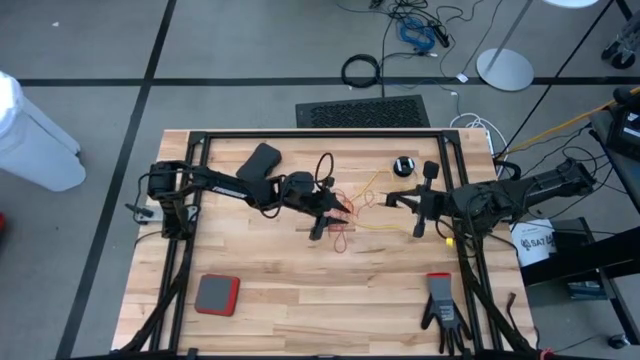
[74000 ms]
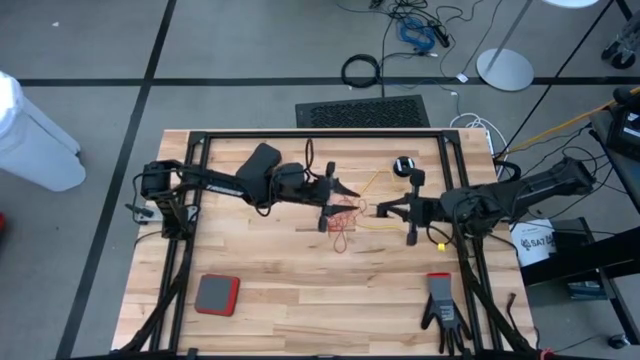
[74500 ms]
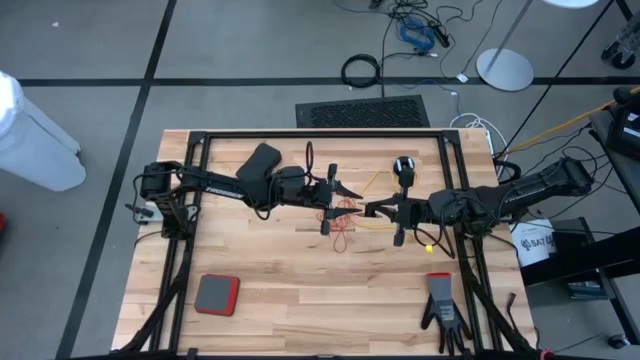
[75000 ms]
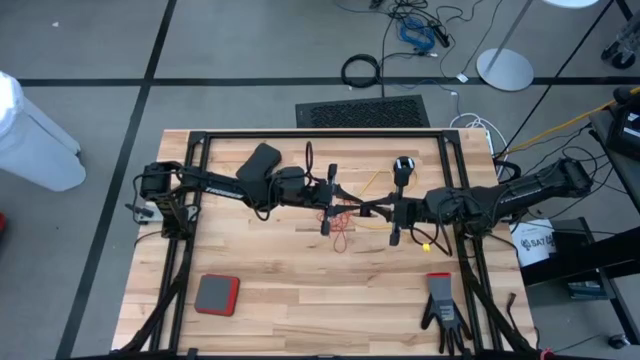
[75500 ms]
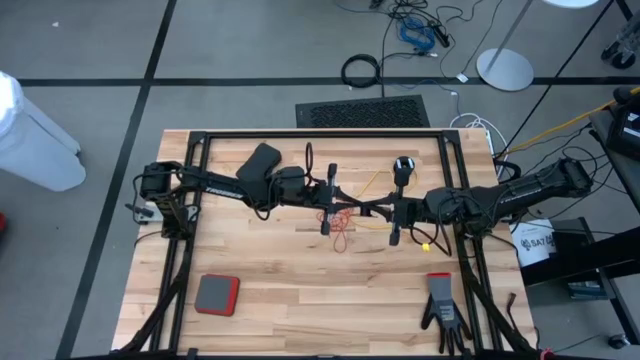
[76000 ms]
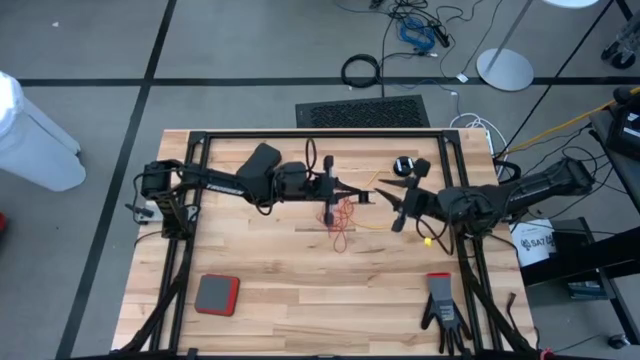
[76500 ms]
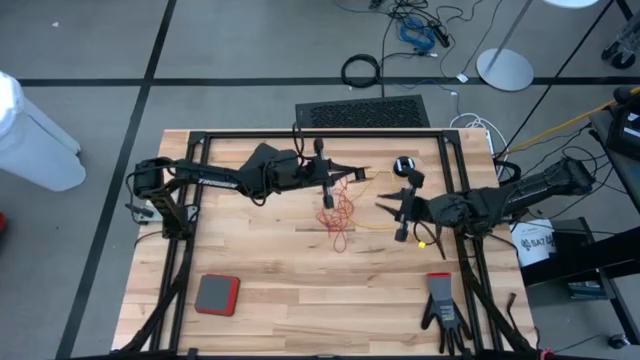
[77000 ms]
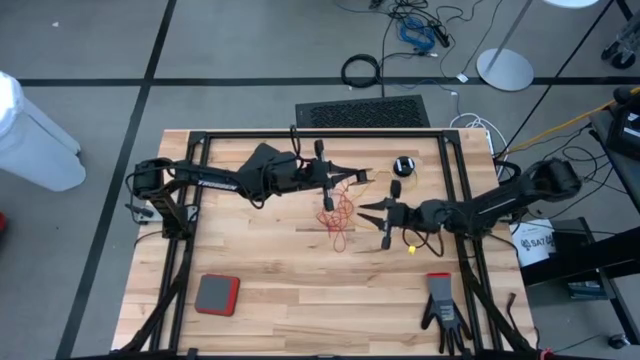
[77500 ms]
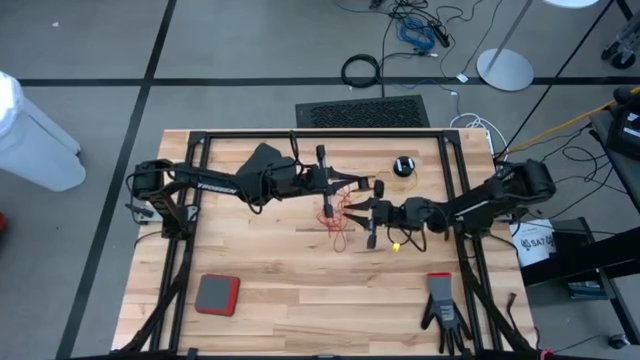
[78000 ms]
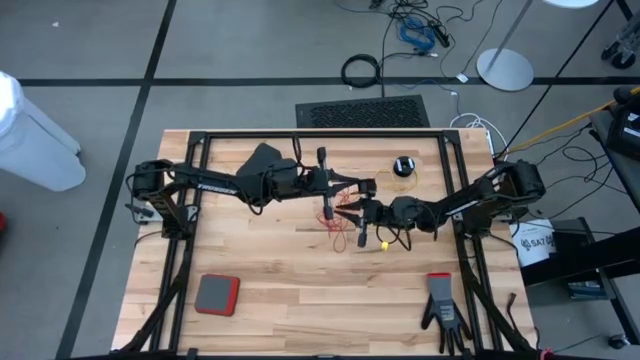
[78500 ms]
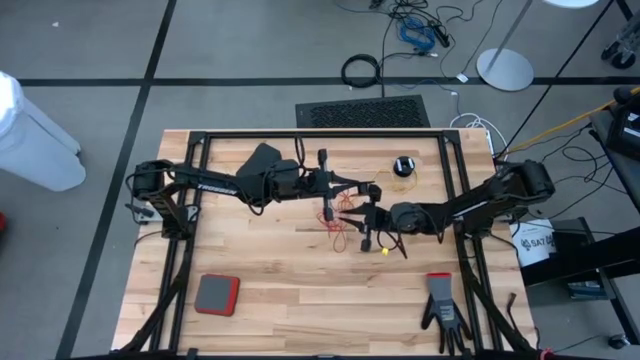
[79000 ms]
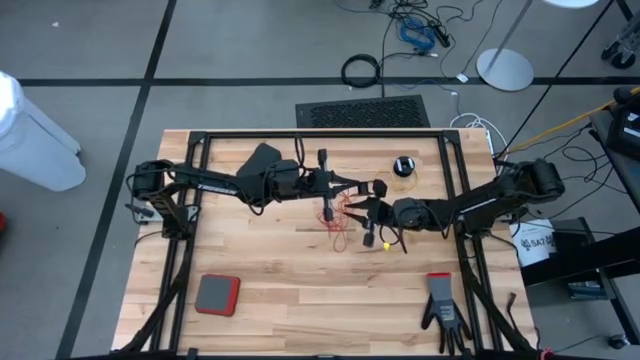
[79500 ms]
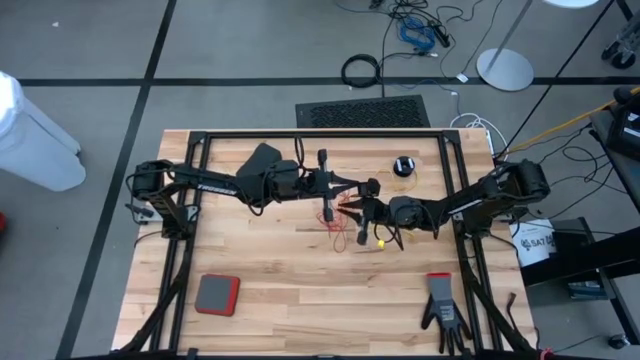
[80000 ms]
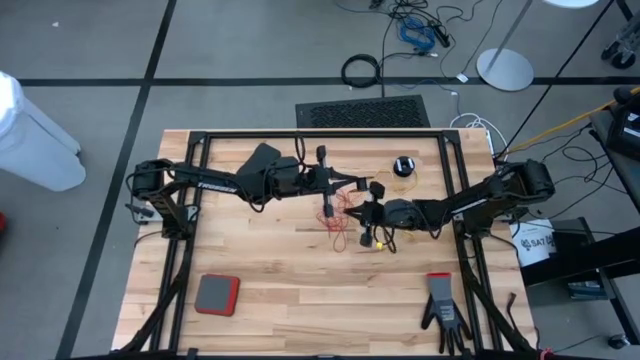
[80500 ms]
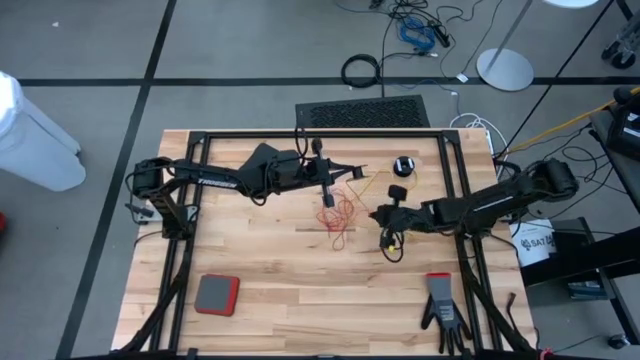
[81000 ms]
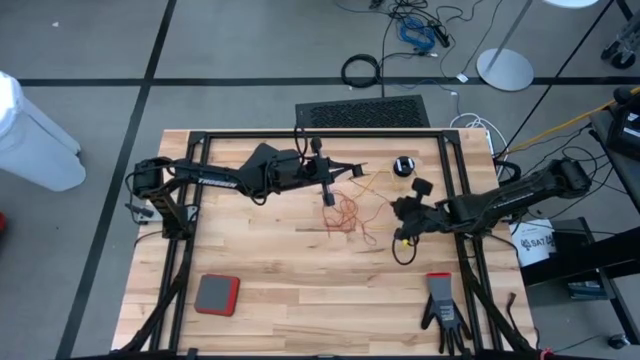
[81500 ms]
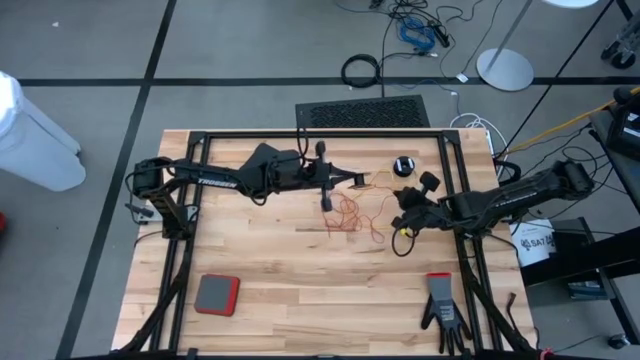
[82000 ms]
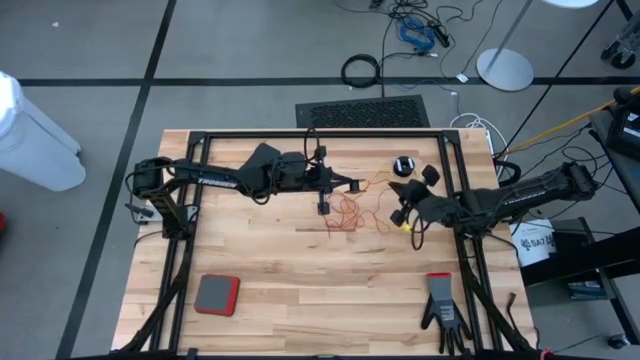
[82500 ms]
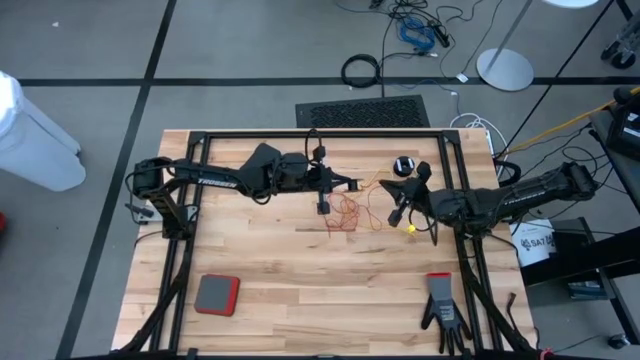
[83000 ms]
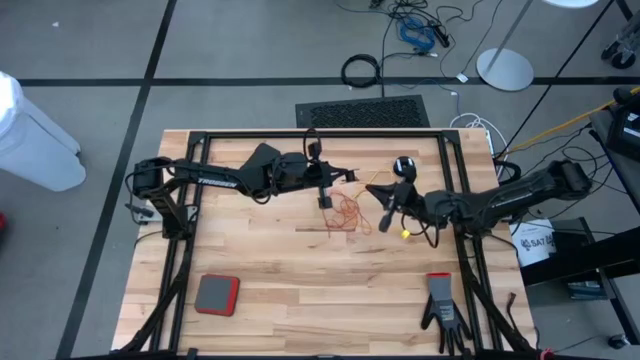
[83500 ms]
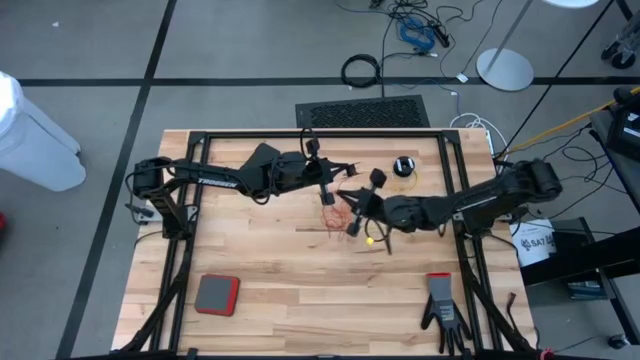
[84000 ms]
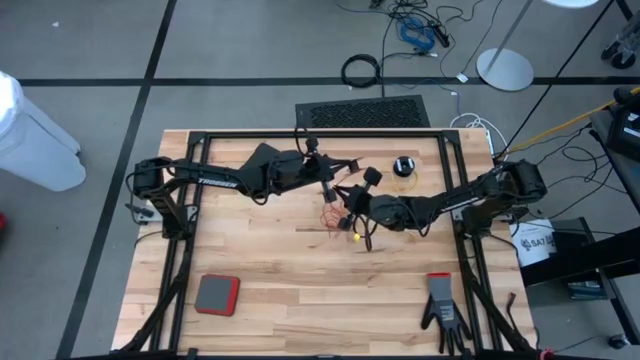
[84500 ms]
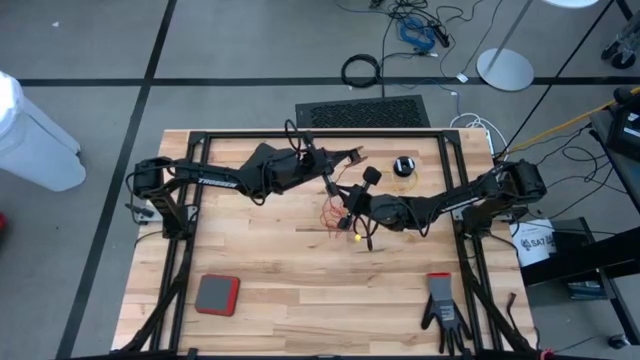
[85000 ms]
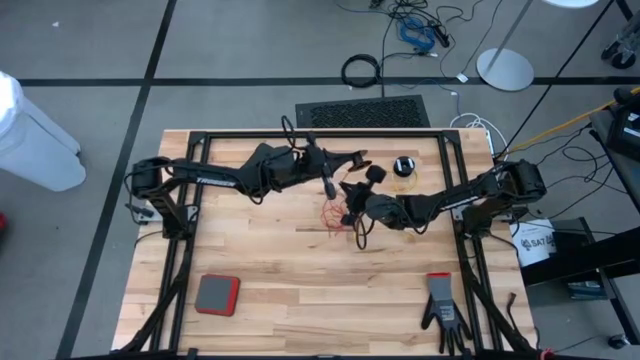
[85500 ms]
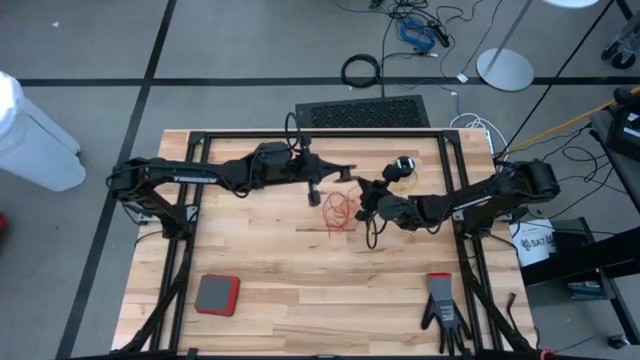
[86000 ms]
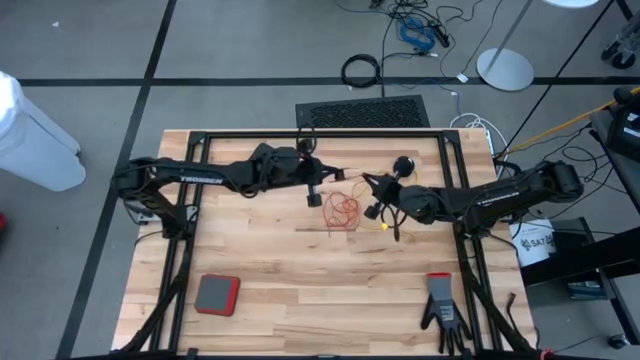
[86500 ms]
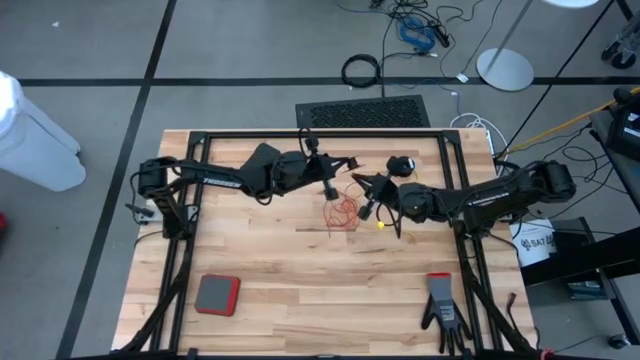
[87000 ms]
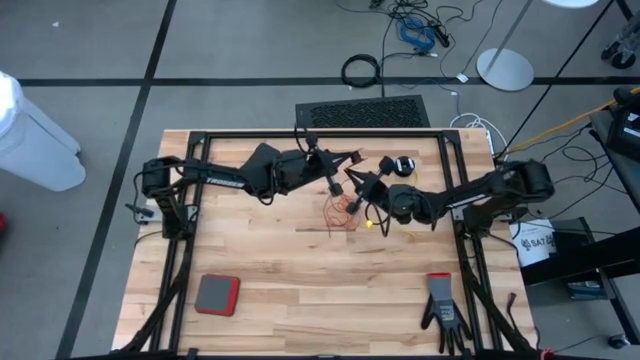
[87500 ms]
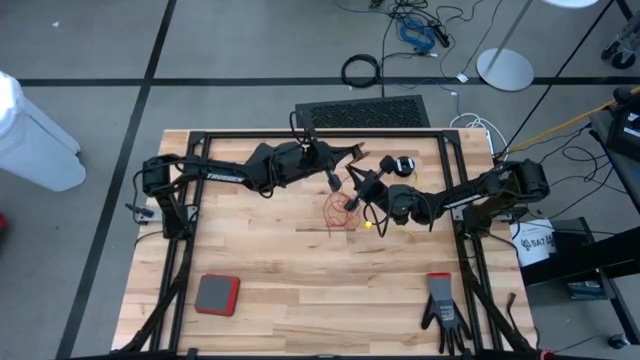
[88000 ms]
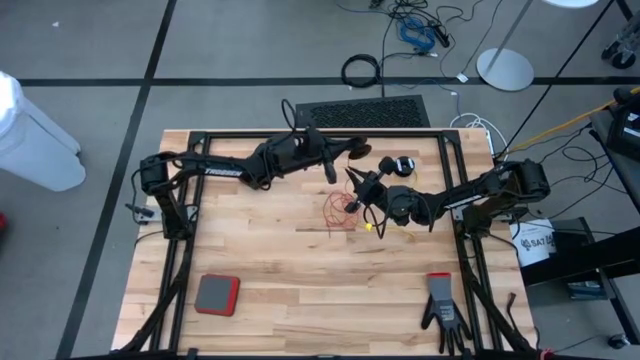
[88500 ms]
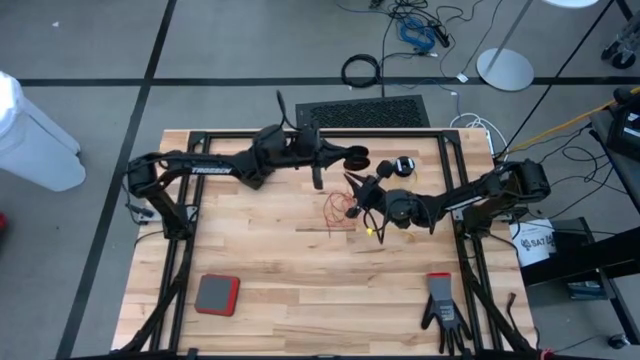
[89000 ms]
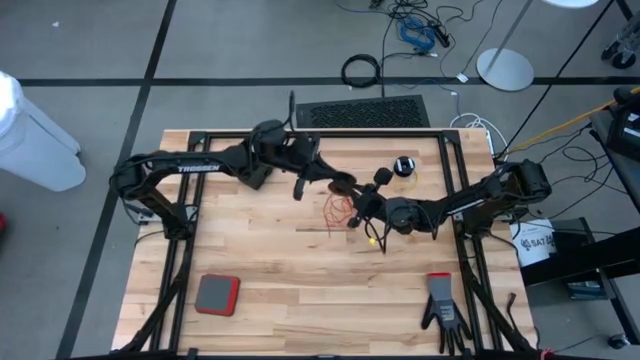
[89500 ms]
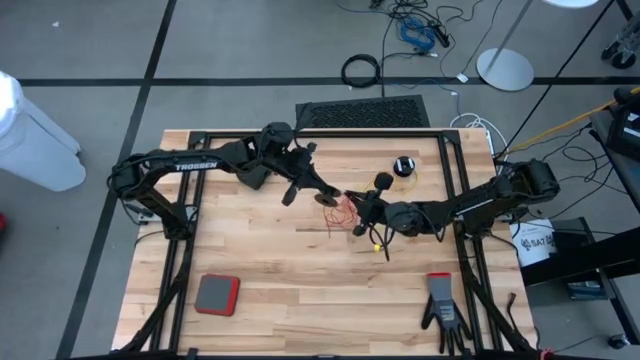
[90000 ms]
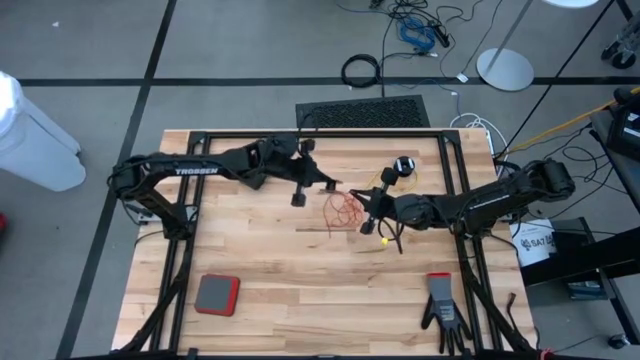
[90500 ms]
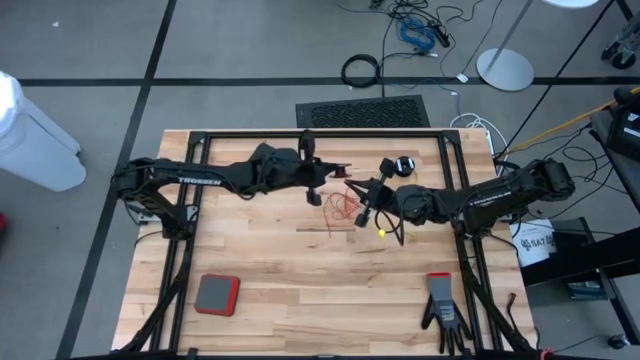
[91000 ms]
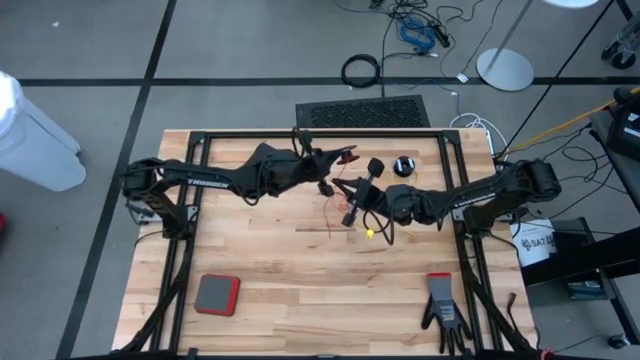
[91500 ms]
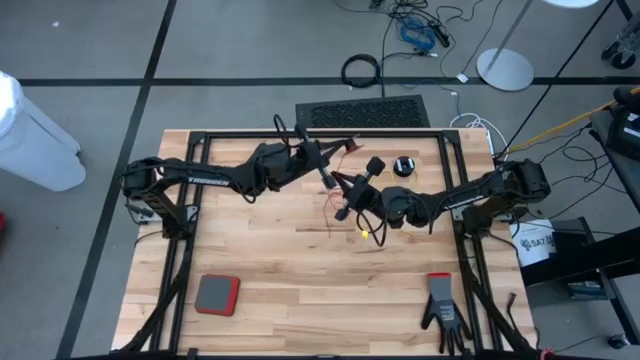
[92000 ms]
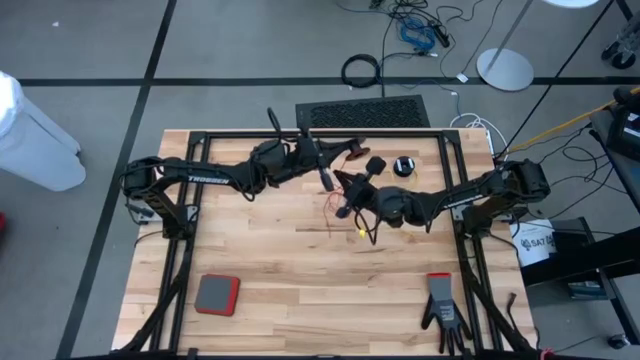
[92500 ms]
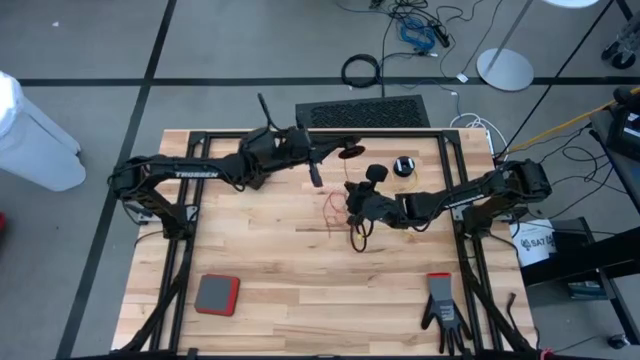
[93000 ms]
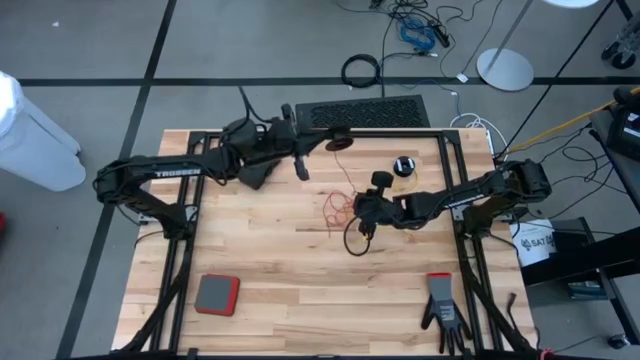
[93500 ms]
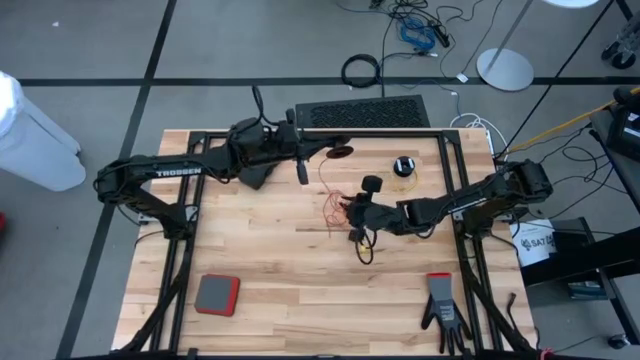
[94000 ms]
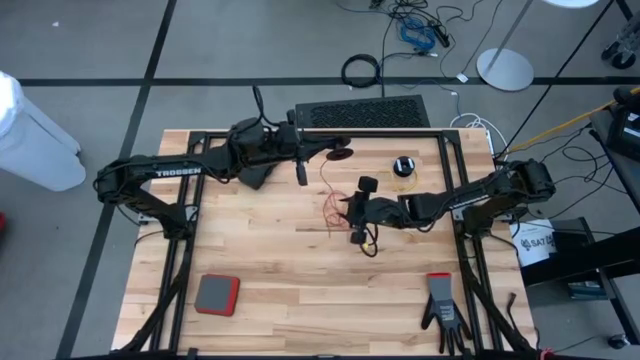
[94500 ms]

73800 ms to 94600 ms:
Task: Coil cords
Coil the red wire on the spool

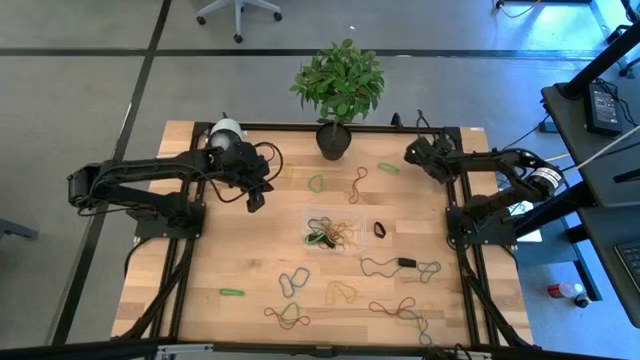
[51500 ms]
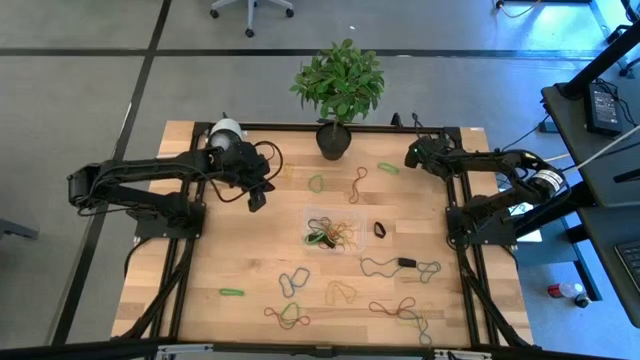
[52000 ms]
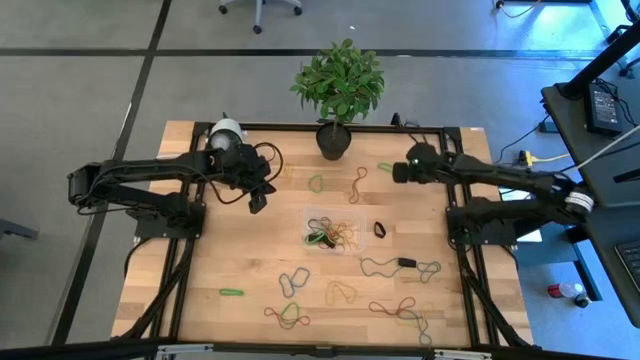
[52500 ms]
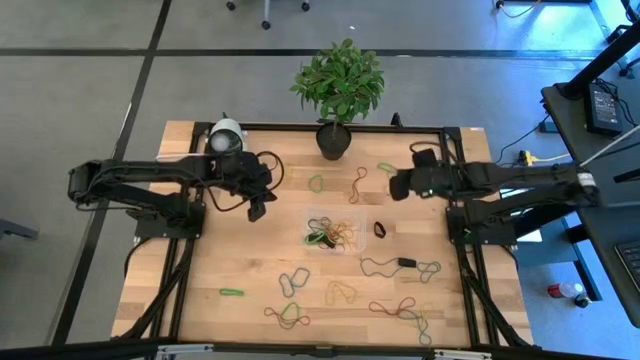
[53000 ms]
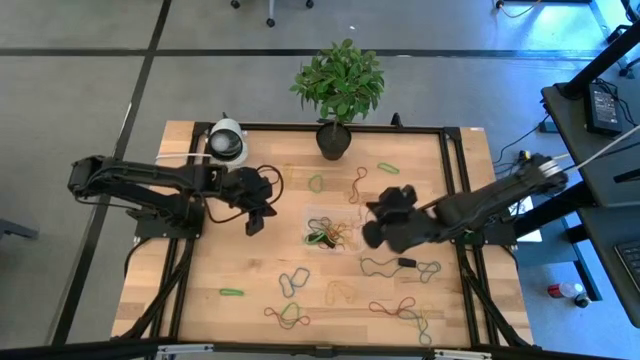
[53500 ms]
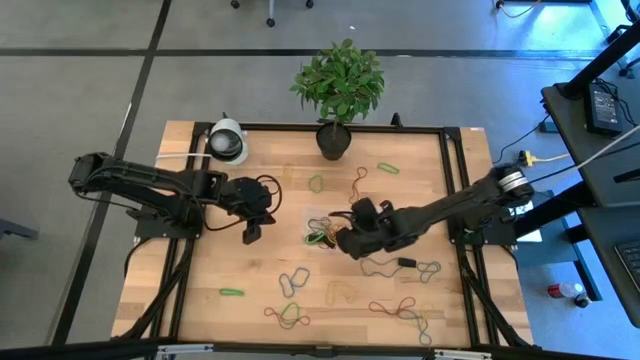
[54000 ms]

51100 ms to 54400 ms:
Task: Pick and place rubber bands into bin
Put the red rubber band into the bin
